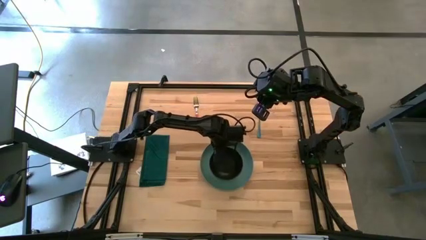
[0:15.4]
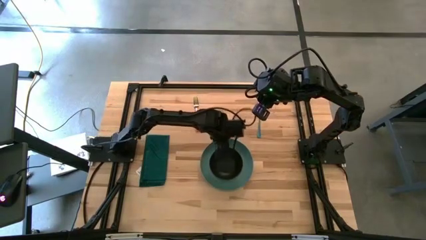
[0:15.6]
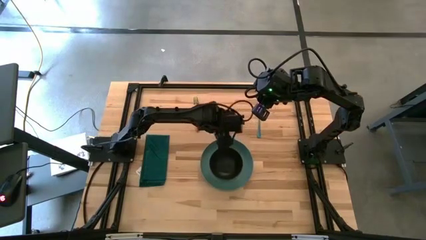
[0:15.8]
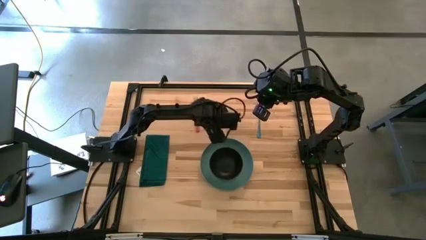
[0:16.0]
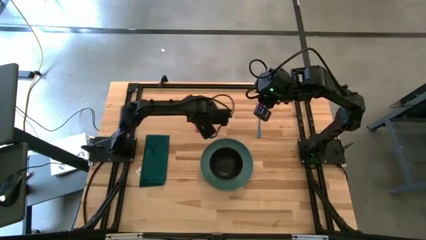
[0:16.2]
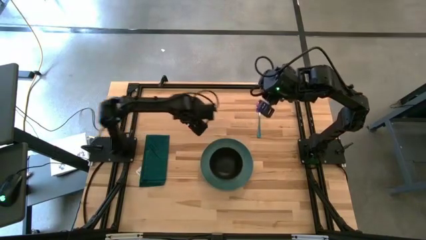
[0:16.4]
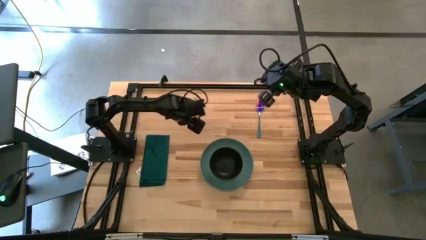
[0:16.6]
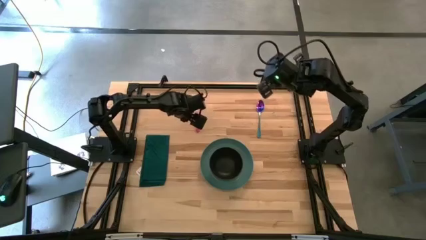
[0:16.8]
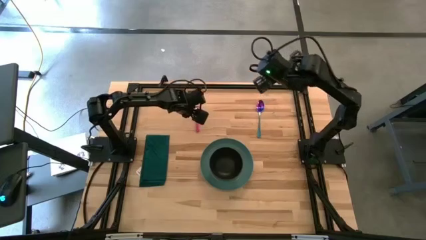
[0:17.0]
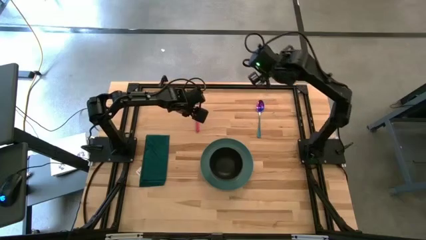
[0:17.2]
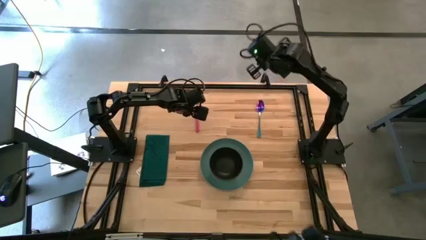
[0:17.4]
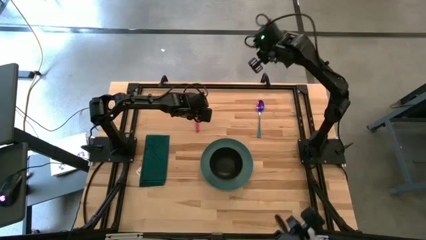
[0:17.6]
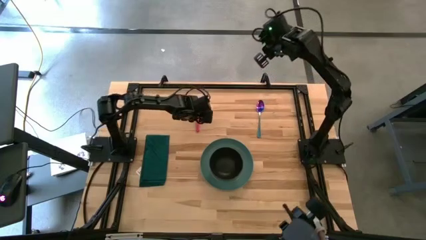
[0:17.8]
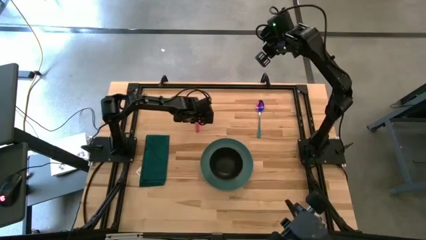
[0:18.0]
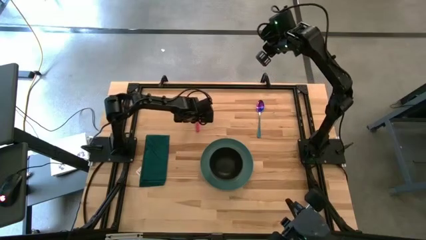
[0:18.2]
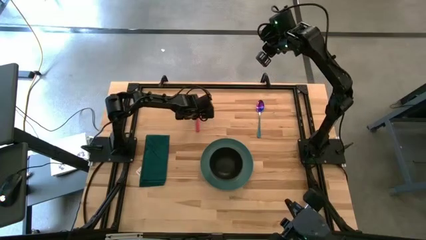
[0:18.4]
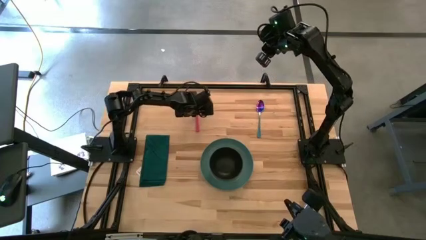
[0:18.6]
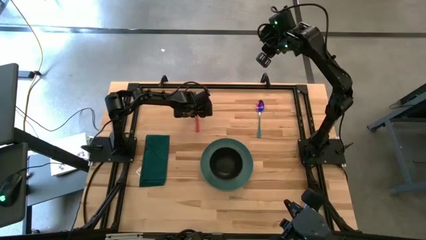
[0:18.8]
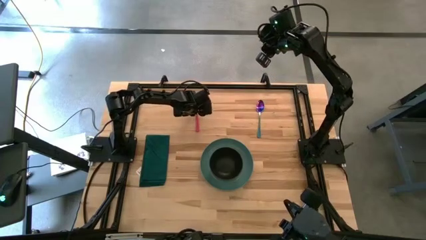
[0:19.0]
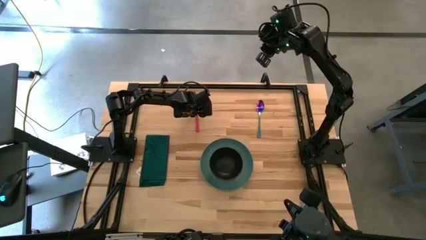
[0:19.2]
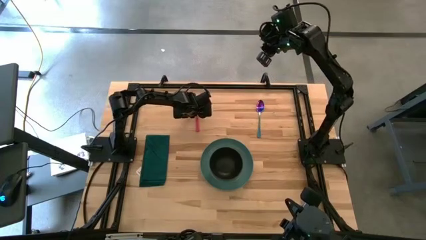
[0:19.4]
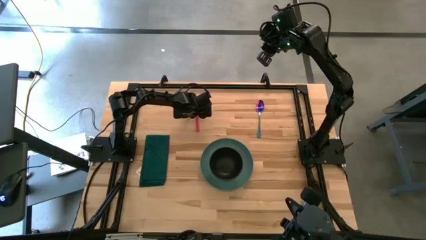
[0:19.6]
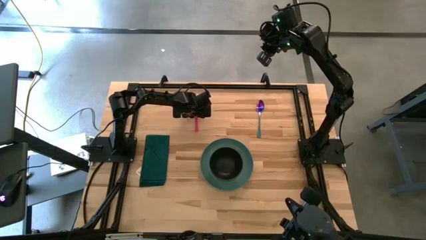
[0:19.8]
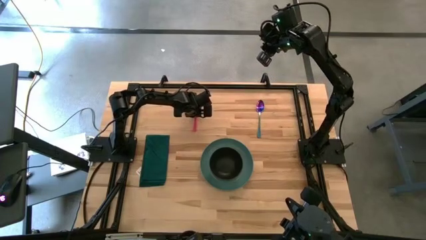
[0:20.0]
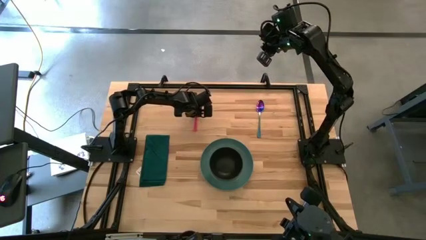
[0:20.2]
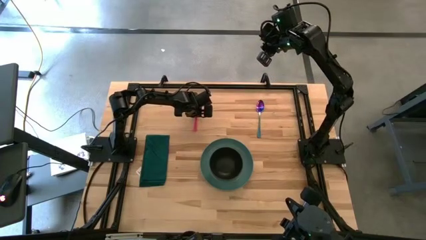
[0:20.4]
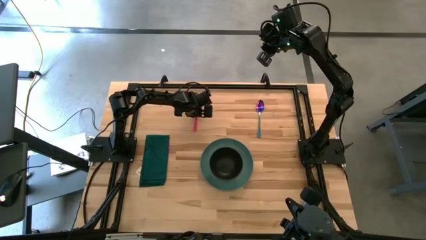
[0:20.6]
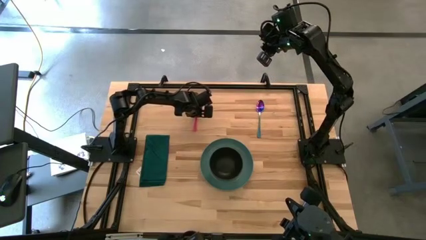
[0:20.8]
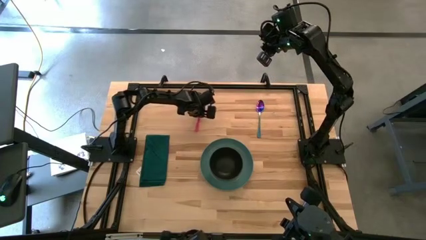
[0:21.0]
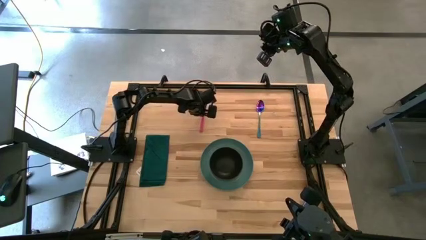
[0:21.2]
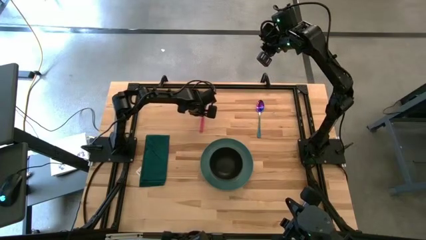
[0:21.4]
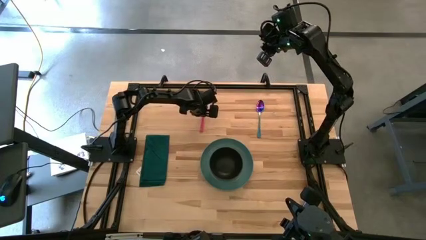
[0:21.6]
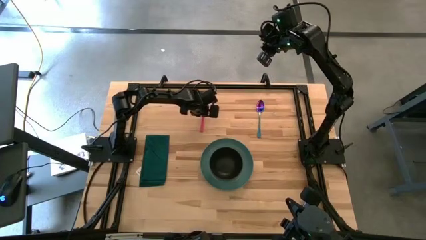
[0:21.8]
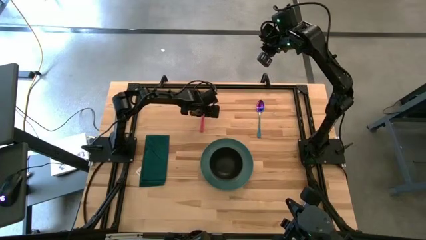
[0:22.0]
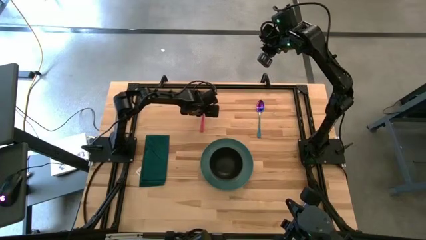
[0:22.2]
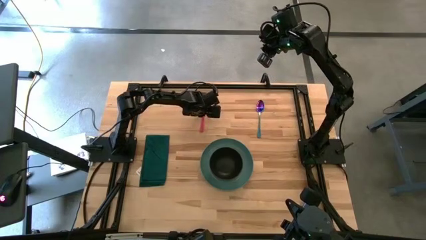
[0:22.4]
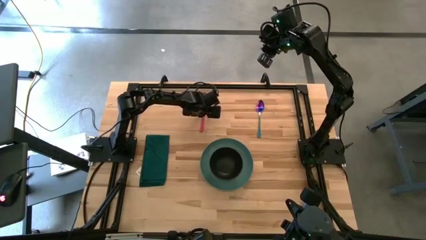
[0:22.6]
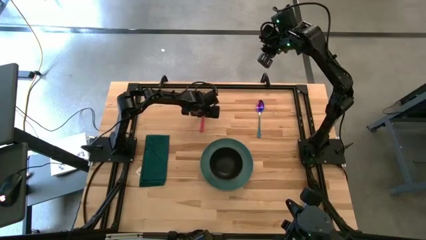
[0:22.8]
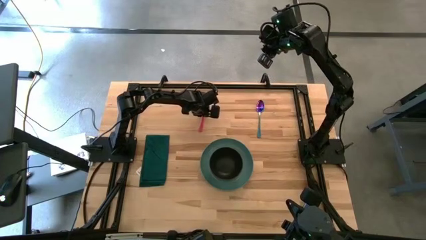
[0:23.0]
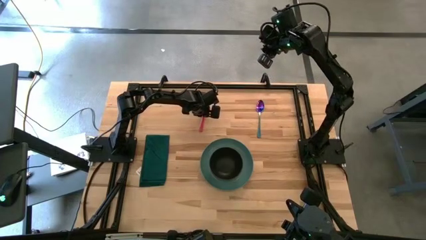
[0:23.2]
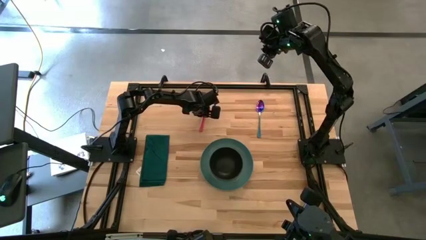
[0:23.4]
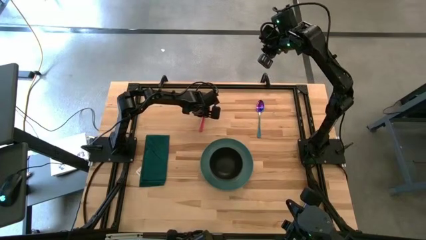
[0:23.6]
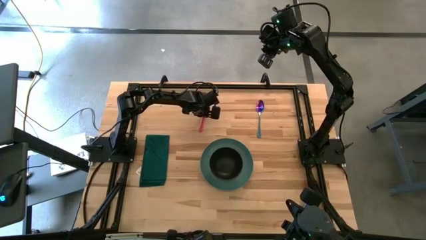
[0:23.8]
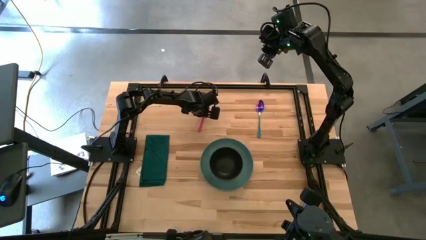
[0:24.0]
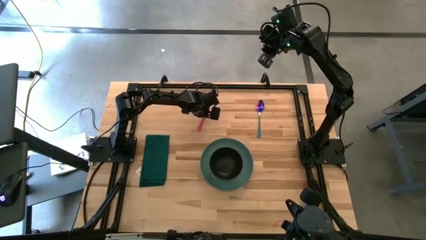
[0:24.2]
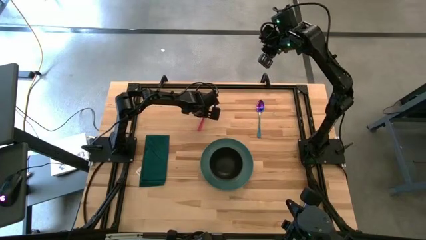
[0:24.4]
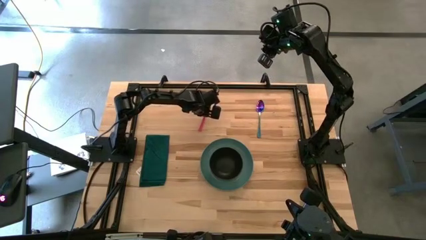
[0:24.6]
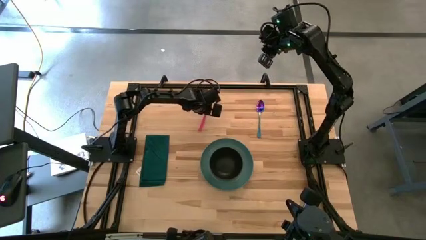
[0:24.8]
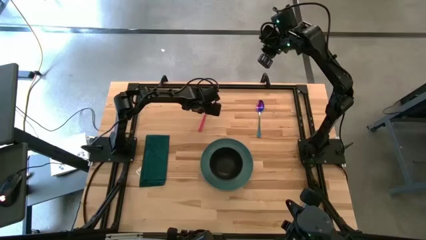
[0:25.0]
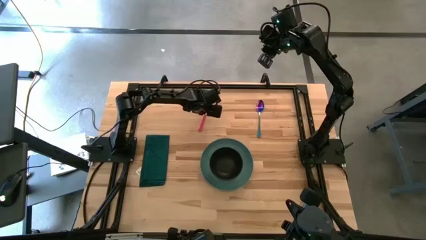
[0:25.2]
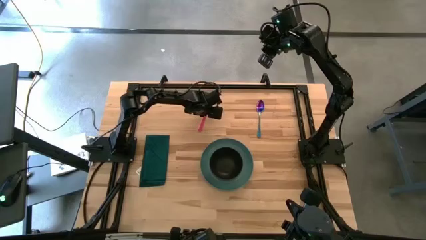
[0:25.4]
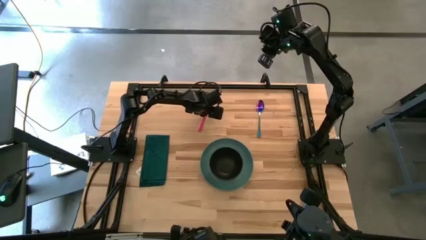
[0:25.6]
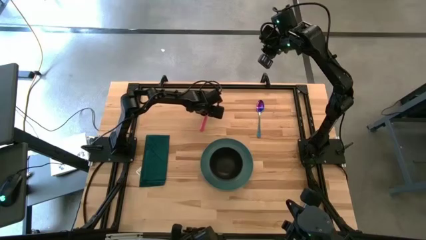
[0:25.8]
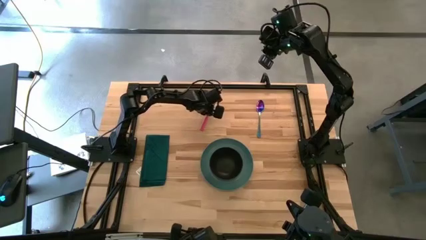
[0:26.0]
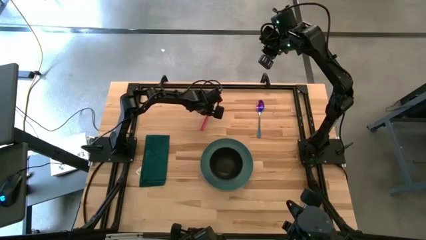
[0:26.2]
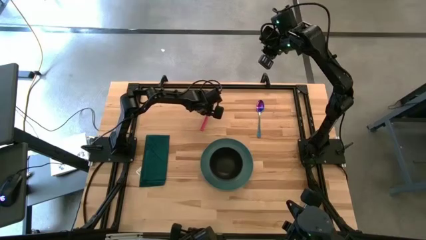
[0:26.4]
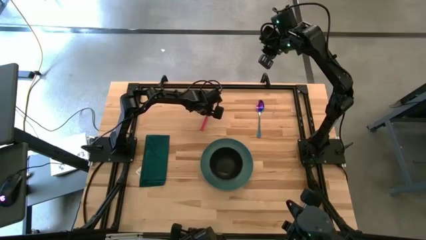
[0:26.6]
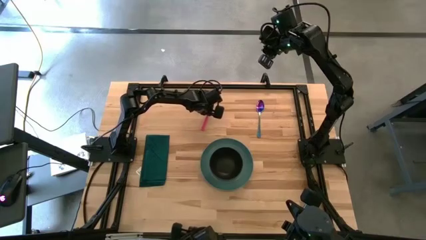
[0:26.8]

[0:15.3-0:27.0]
Task: Set table place
Put the red fork to the right of the blue plate

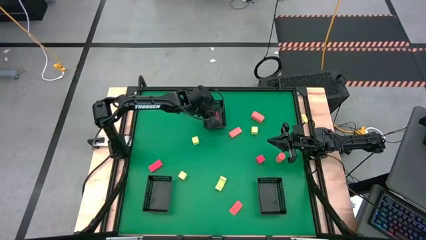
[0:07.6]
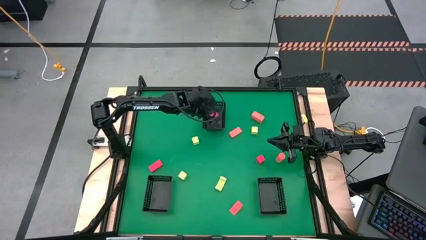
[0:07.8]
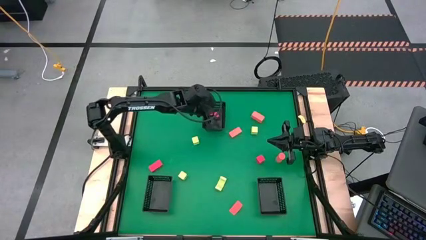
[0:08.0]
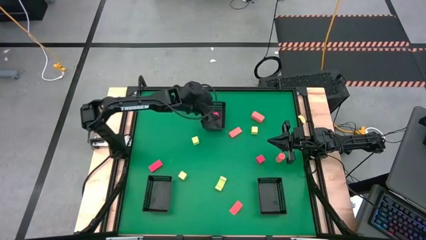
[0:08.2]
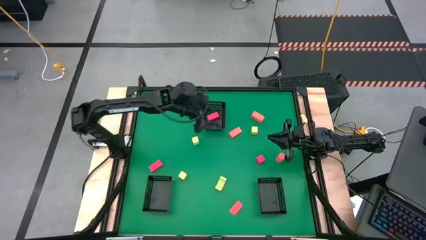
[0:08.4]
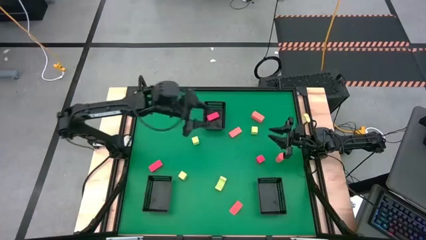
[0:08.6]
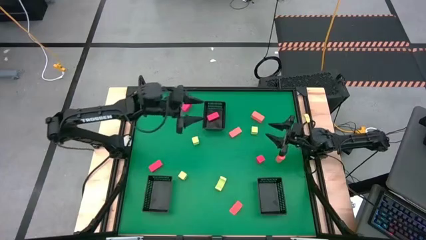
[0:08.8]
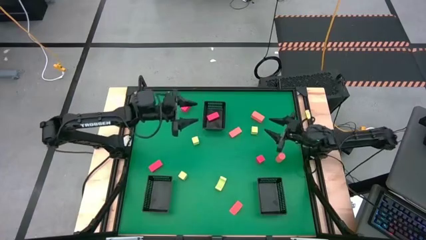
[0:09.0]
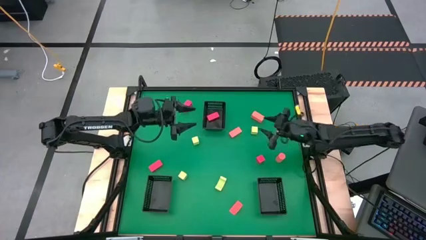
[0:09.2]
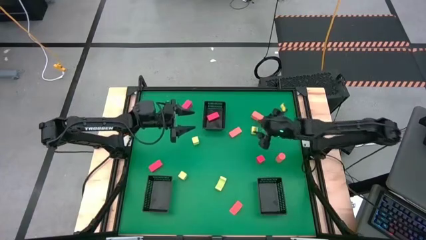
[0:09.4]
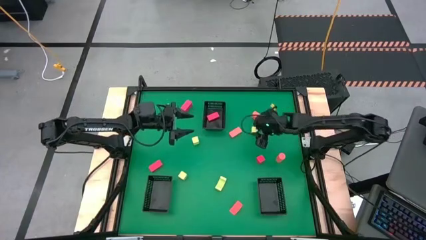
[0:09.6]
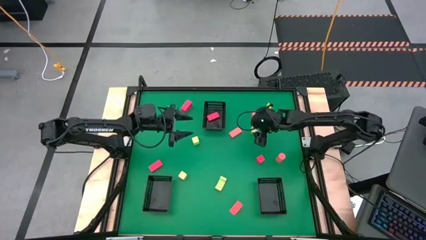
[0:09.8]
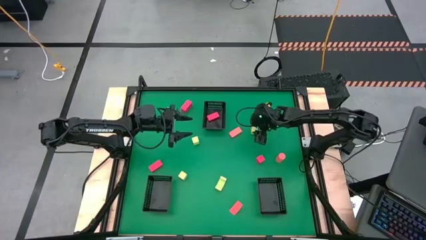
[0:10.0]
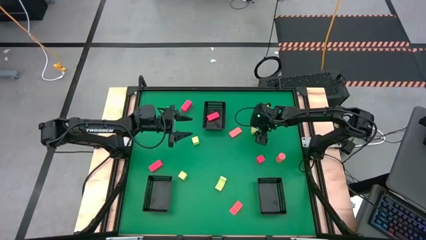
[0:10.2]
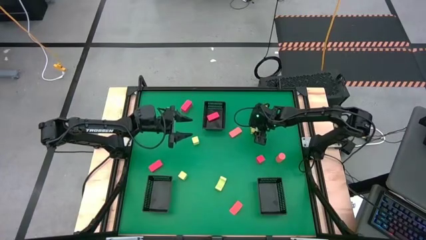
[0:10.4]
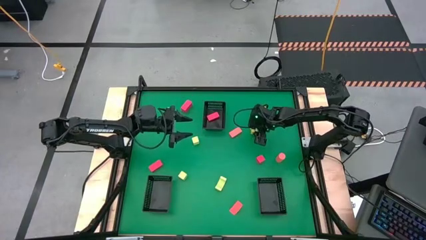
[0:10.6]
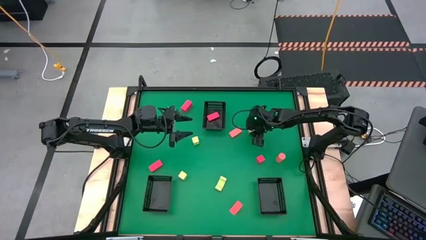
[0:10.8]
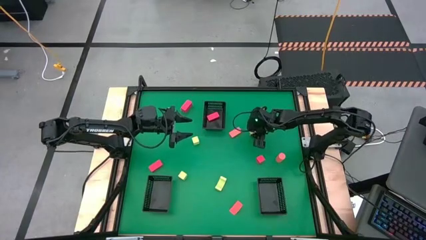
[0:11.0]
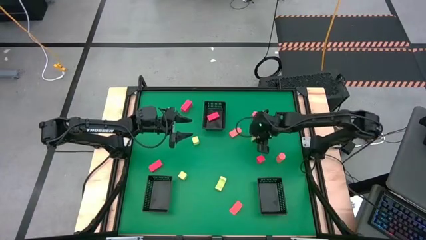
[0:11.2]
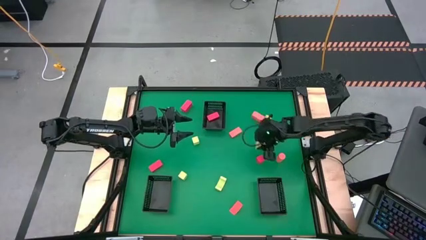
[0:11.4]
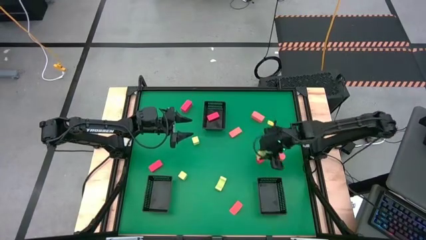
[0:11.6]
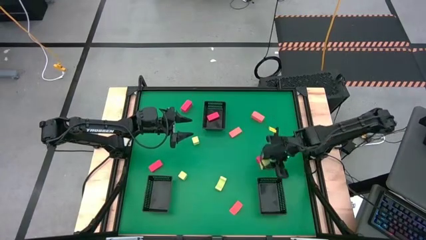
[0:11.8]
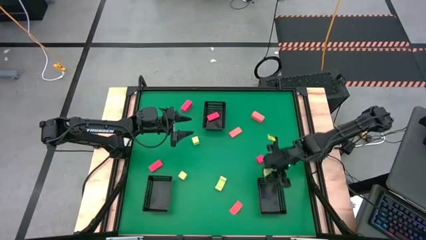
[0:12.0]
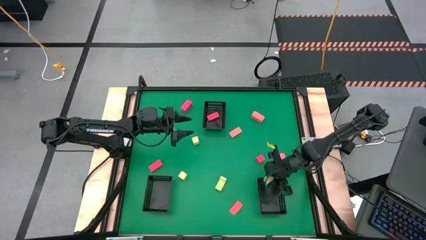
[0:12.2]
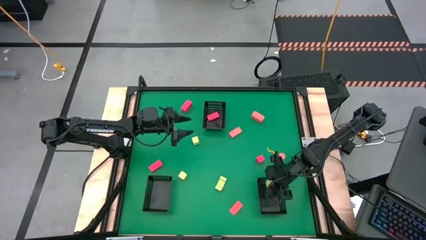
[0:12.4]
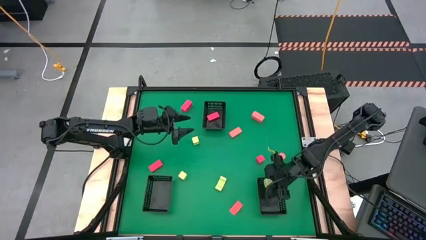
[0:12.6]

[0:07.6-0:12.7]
Task: Sort & place blocks by color
Put the green block into the bottom right black bin
